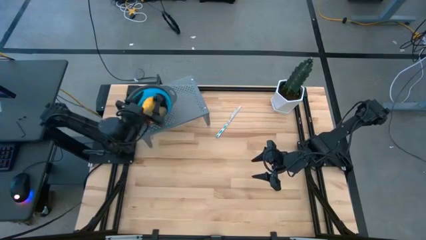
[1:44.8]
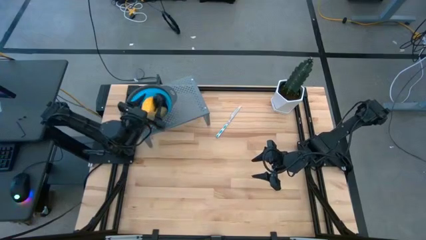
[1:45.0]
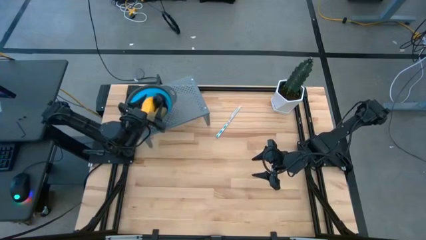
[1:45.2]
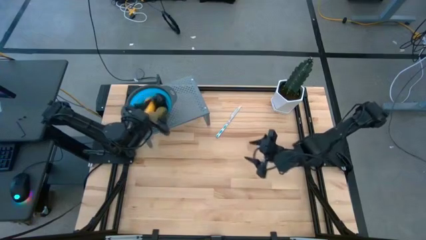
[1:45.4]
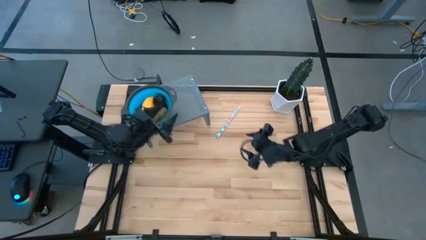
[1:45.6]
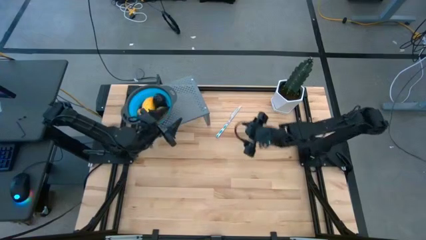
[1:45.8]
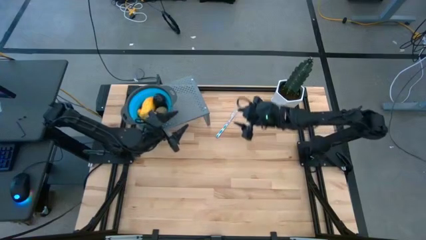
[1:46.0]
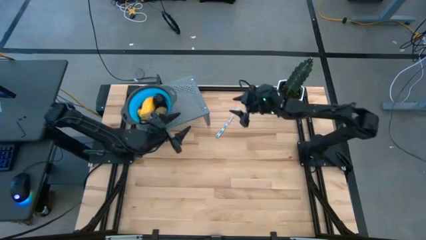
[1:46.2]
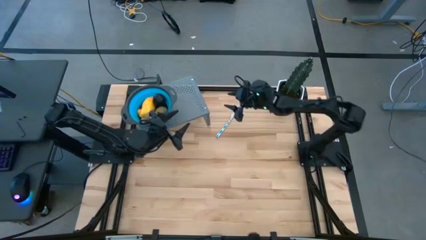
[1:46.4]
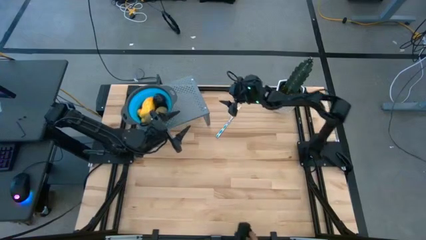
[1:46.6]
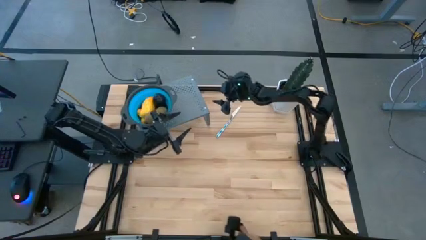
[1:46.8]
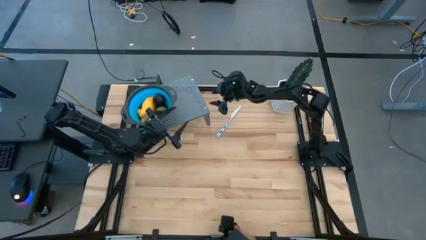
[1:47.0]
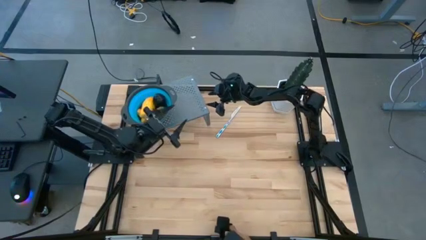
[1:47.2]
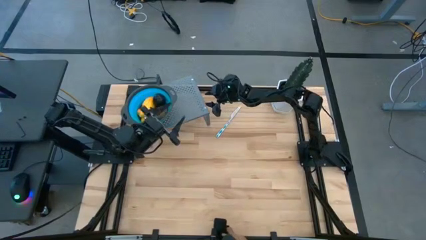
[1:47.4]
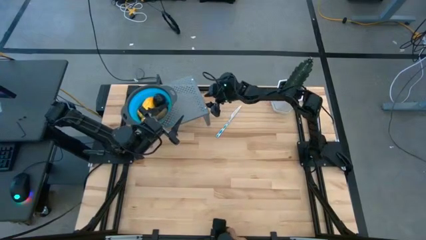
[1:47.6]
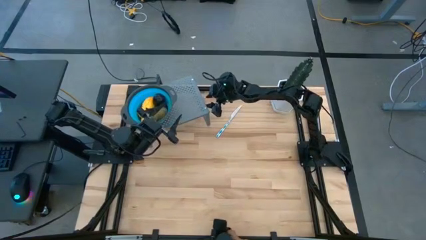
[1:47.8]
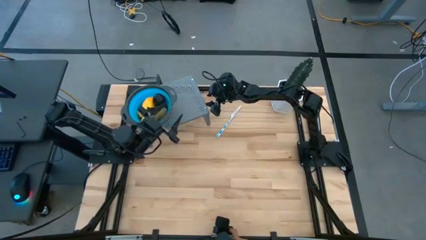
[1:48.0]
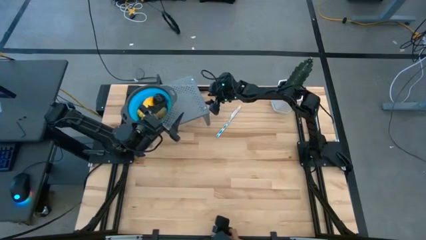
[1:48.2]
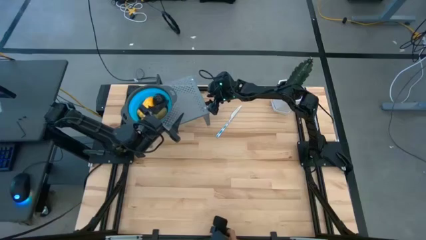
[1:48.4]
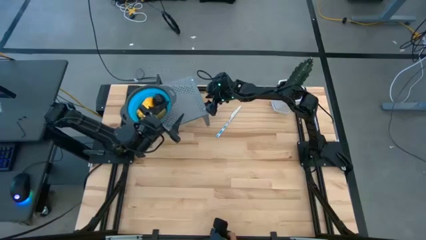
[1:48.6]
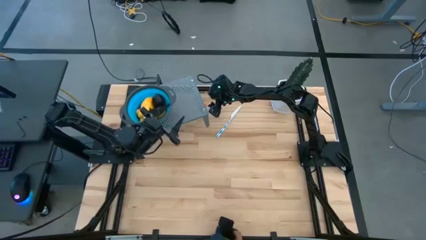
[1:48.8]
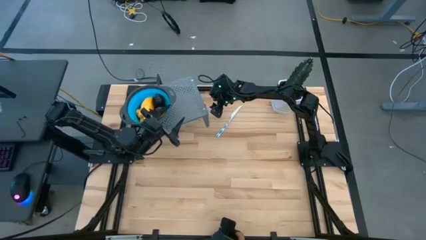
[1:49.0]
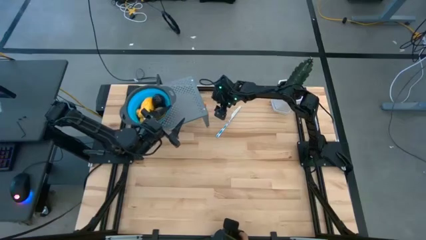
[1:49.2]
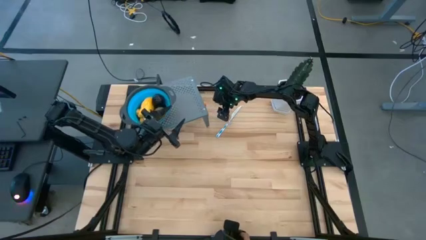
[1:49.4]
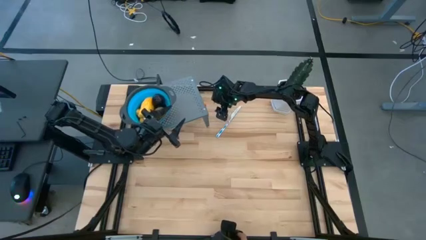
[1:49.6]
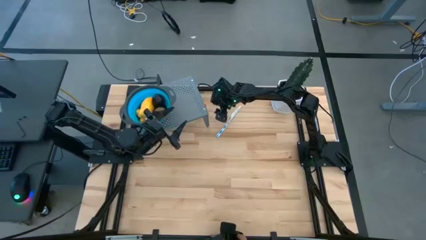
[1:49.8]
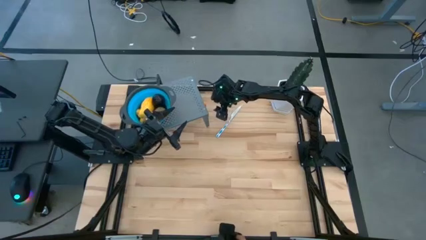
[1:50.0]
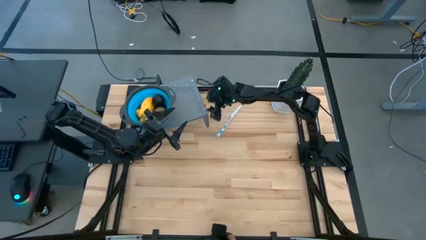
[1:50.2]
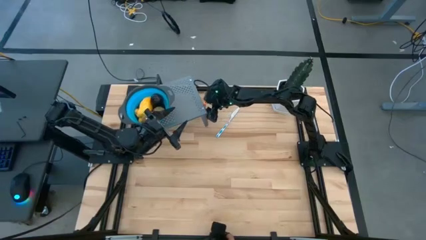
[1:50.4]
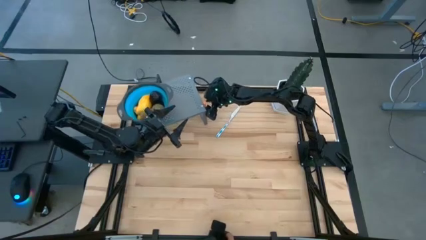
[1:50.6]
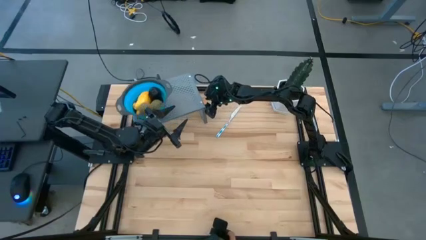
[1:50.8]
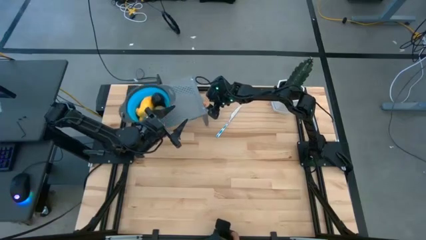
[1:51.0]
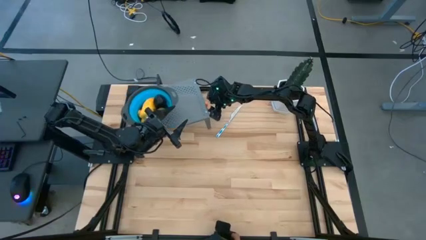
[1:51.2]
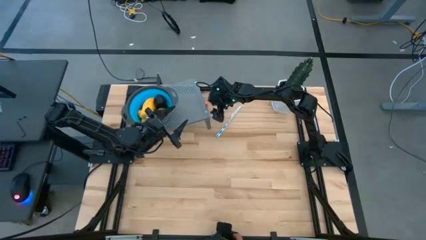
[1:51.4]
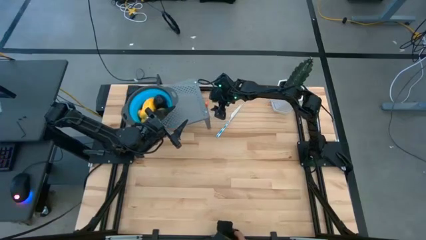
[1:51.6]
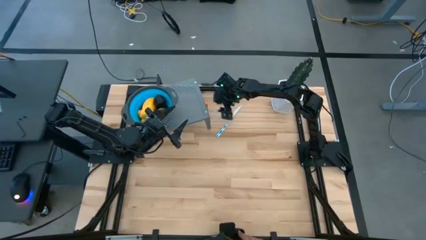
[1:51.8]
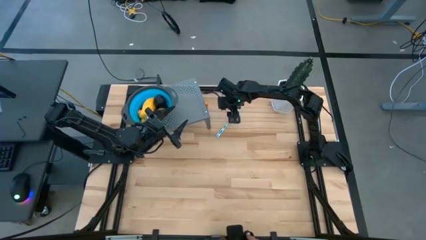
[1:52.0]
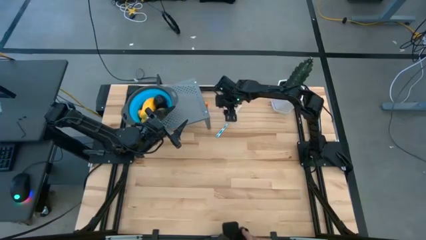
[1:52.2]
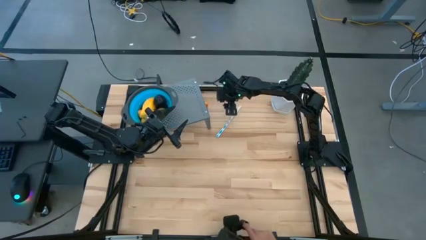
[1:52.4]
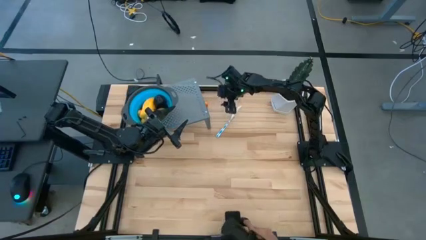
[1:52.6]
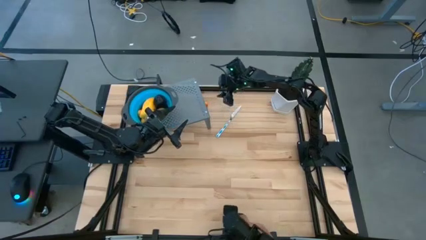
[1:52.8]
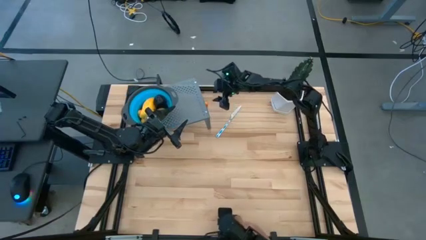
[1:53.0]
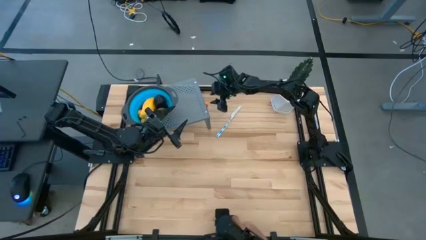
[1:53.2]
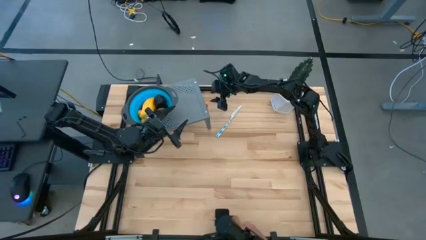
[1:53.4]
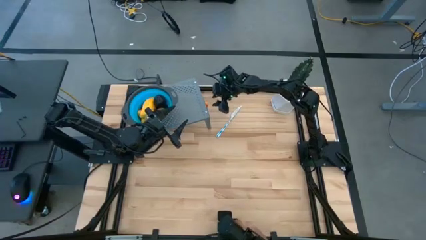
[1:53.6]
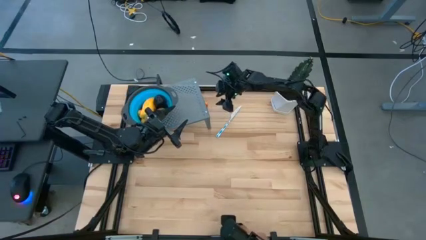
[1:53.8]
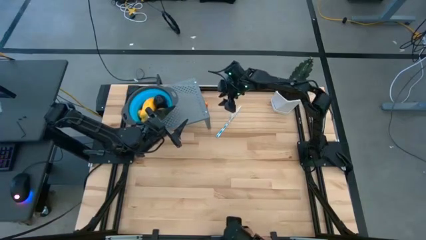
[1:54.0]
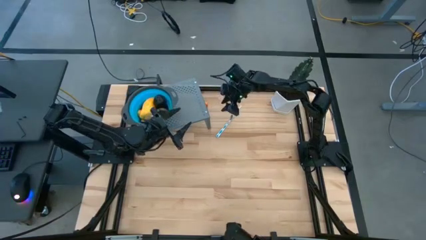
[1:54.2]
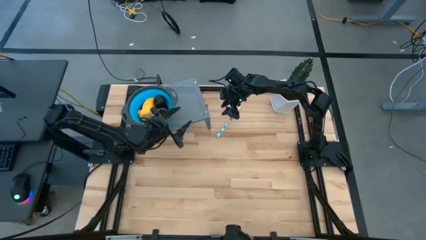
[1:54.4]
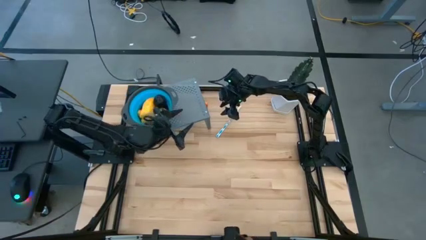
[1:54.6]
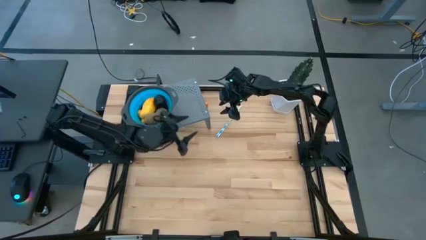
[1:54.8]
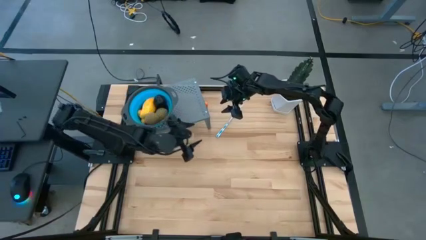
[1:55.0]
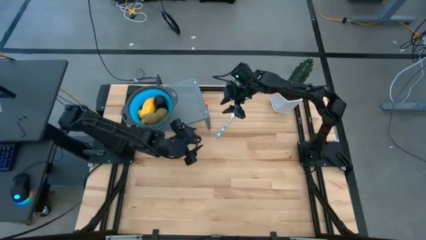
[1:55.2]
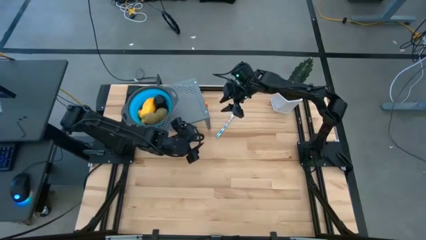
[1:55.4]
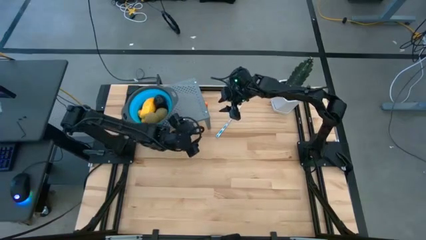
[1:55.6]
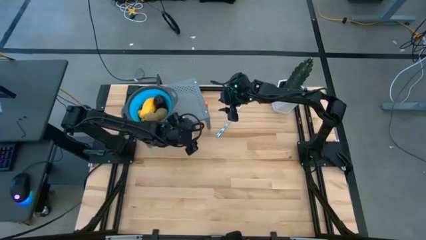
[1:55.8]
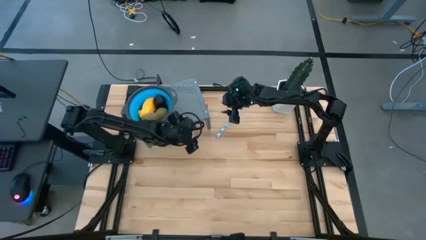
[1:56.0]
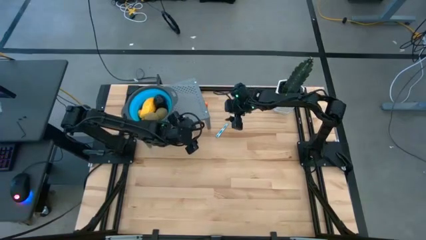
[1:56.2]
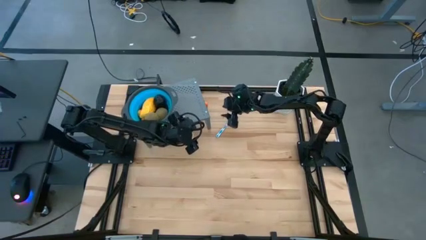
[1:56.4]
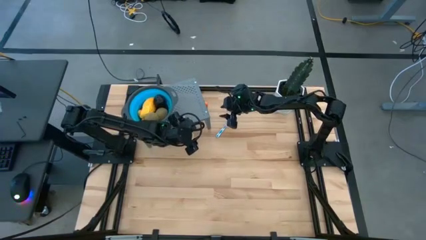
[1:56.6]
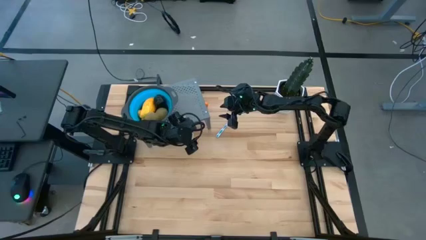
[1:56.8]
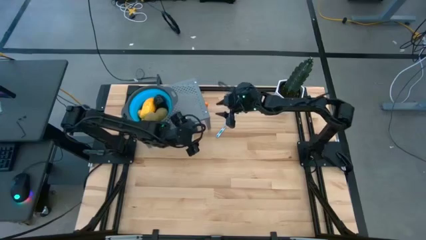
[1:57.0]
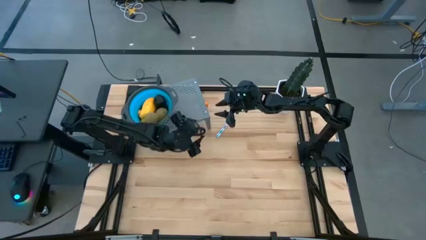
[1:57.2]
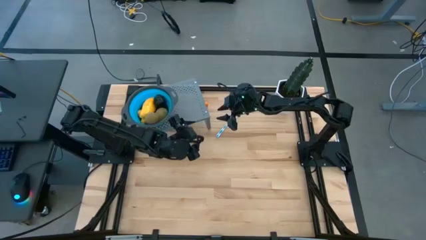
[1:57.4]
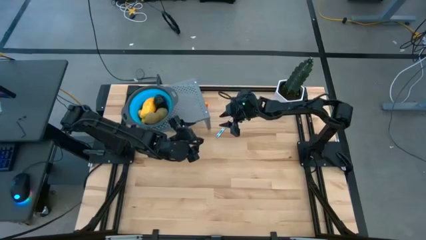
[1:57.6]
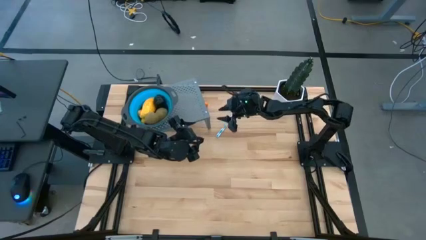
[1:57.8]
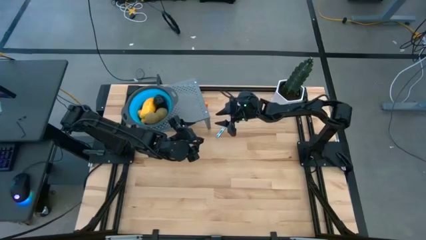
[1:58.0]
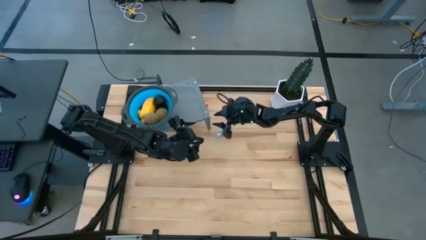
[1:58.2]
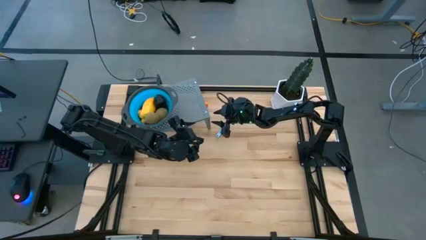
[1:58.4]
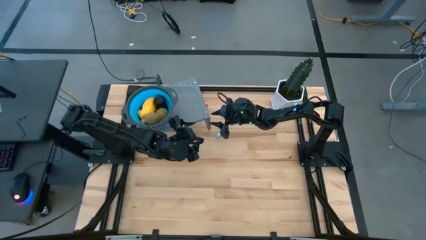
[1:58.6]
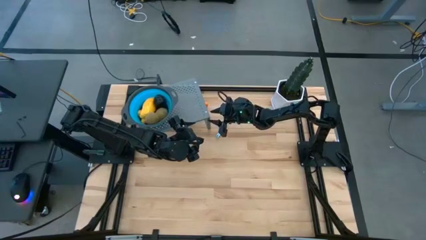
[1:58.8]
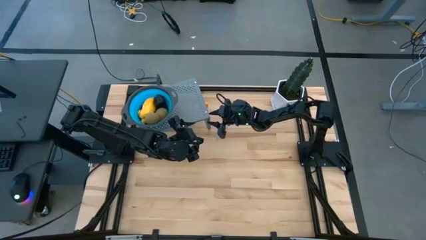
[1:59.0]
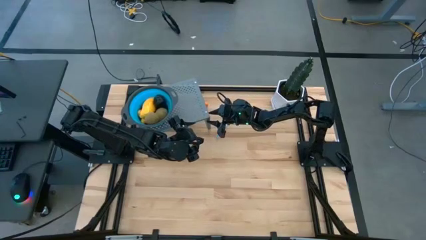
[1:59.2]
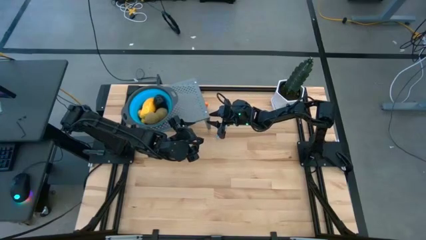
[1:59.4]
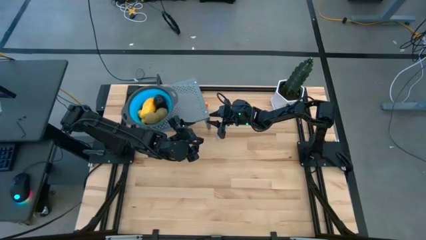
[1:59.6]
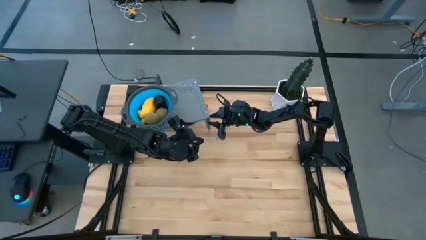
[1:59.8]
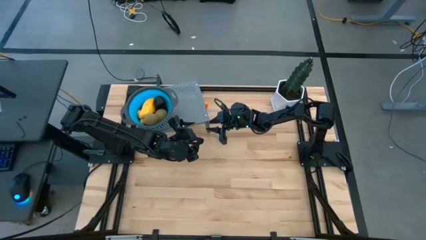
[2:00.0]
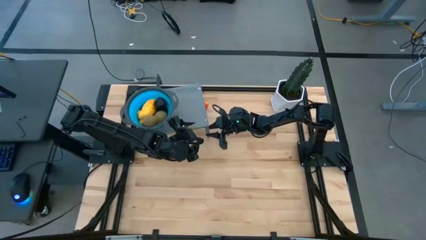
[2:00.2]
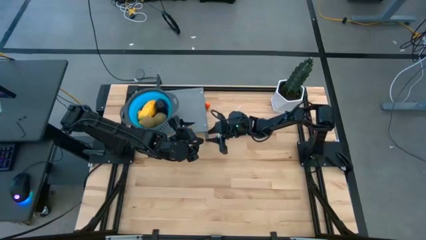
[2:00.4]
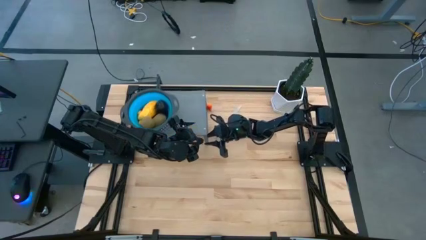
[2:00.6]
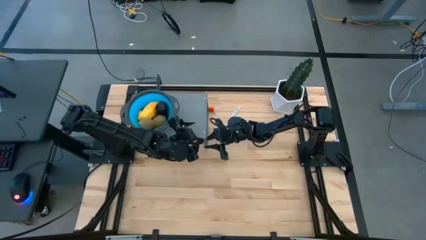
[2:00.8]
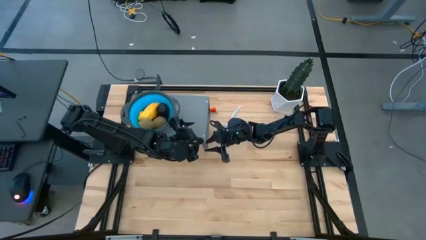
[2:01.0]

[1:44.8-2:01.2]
Task: Pick & Place Fruit
Adjust the shelf

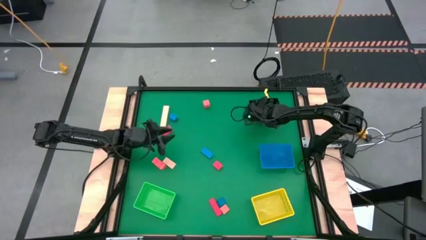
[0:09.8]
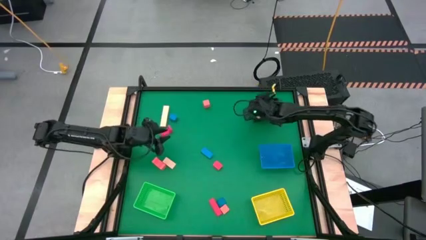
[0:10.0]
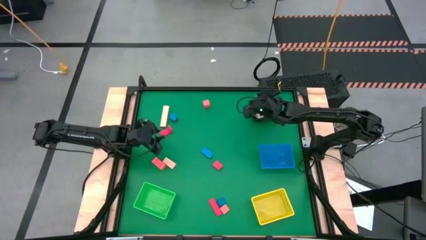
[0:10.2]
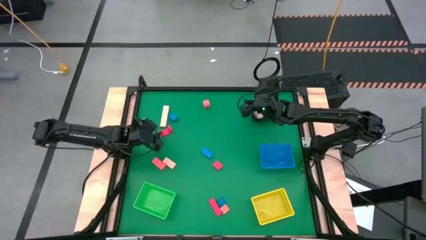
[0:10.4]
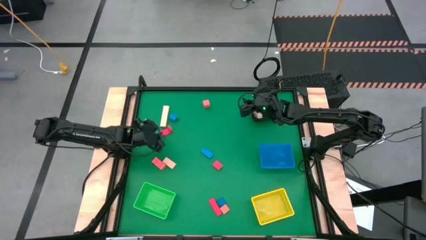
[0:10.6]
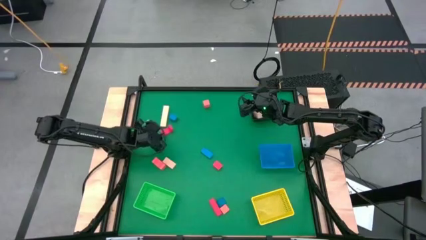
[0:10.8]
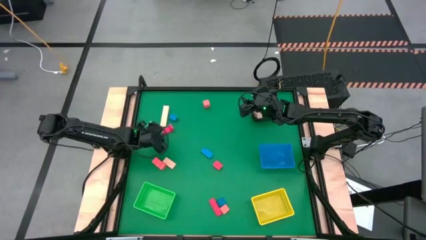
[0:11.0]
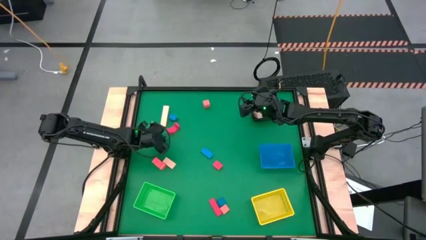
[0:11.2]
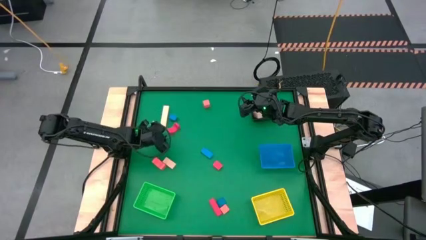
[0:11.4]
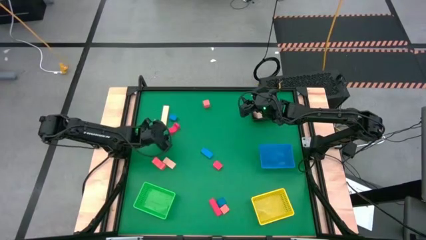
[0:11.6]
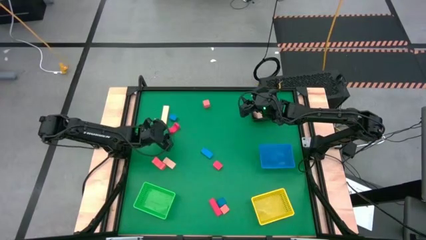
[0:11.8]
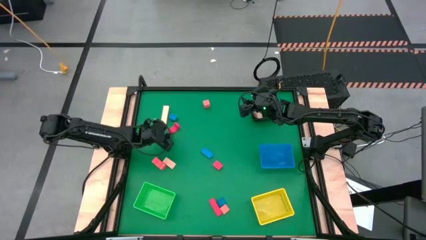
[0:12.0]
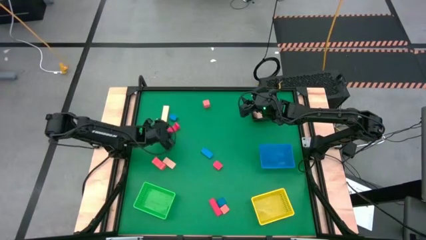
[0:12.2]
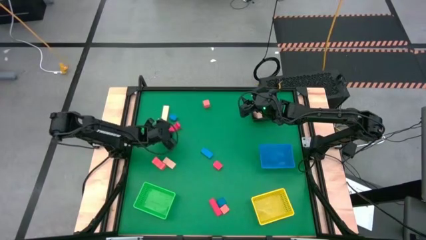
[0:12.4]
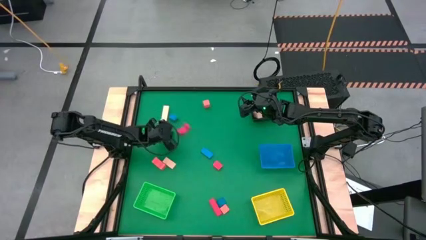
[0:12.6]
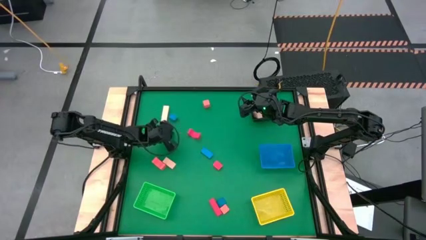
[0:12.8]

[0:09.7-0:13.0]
Task: Sort & place blocks by color
Put the red block into the blue bin
